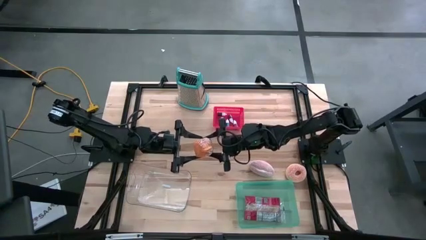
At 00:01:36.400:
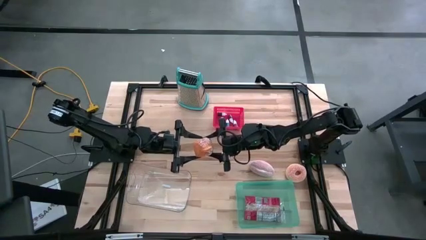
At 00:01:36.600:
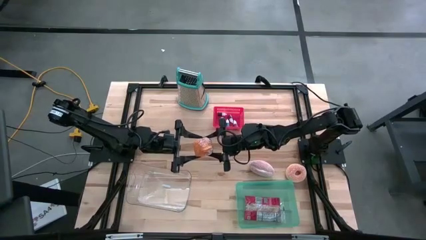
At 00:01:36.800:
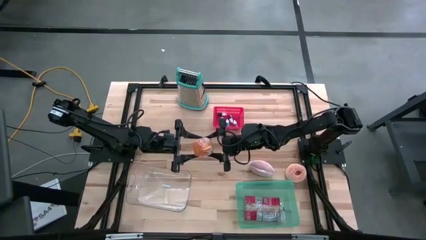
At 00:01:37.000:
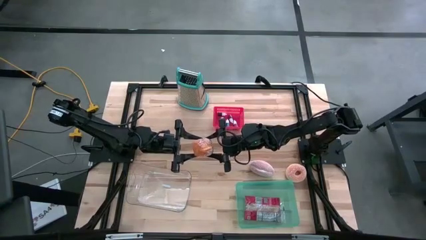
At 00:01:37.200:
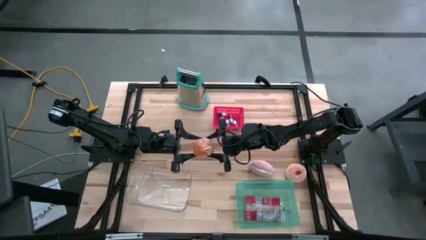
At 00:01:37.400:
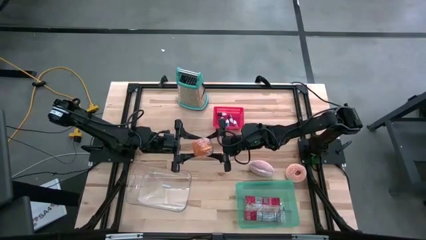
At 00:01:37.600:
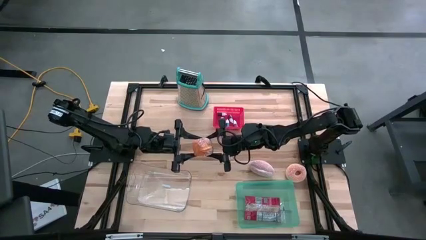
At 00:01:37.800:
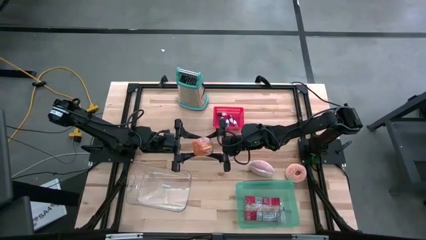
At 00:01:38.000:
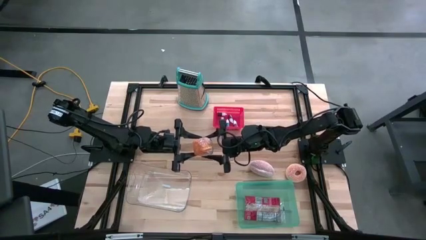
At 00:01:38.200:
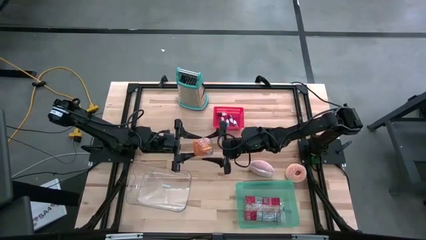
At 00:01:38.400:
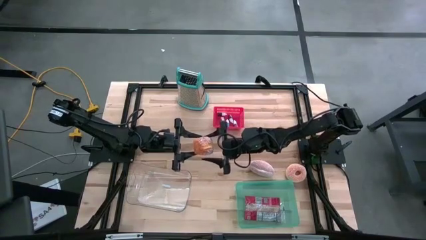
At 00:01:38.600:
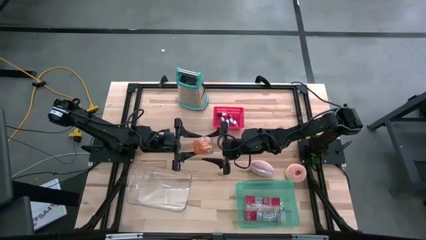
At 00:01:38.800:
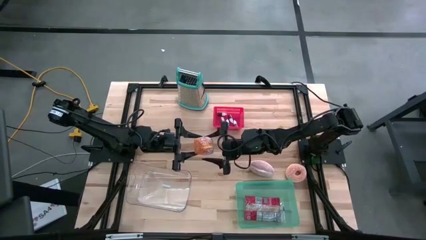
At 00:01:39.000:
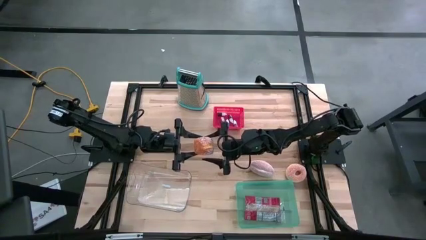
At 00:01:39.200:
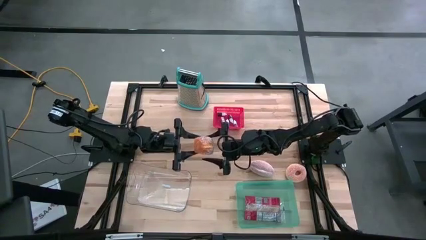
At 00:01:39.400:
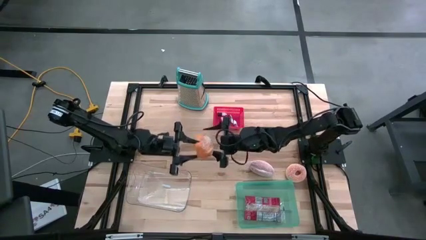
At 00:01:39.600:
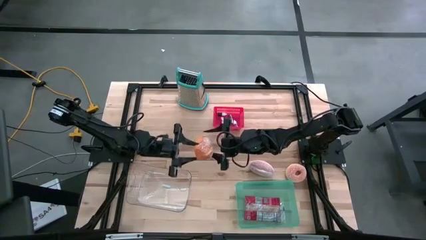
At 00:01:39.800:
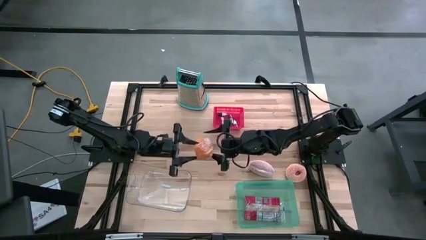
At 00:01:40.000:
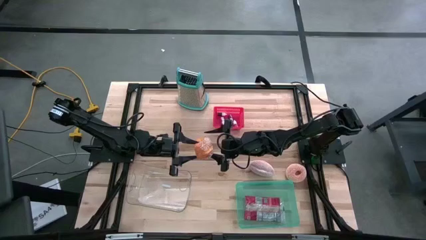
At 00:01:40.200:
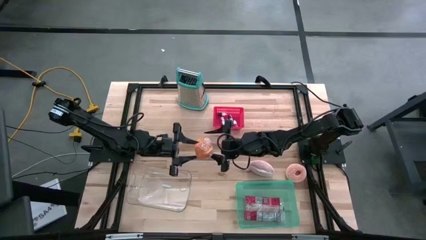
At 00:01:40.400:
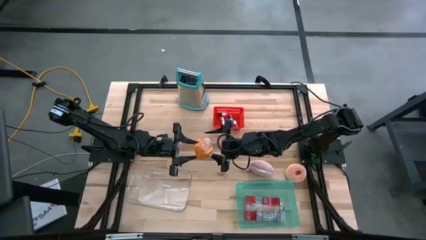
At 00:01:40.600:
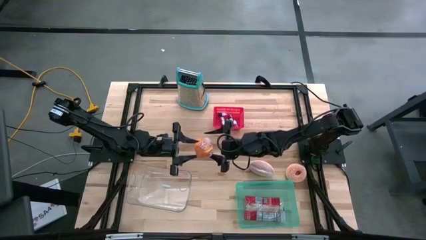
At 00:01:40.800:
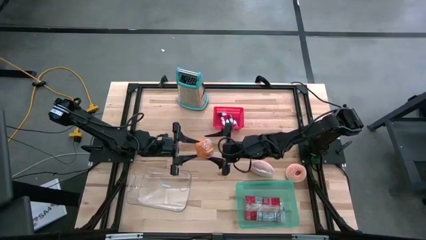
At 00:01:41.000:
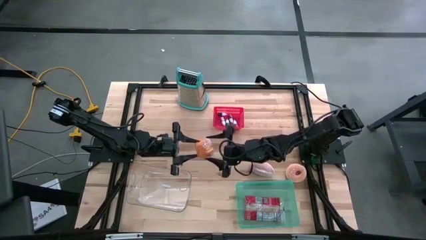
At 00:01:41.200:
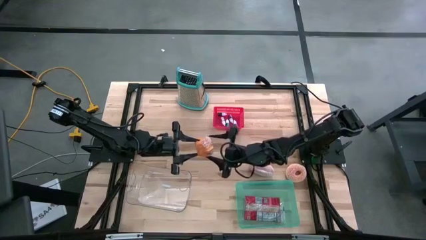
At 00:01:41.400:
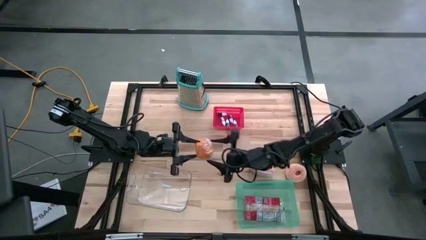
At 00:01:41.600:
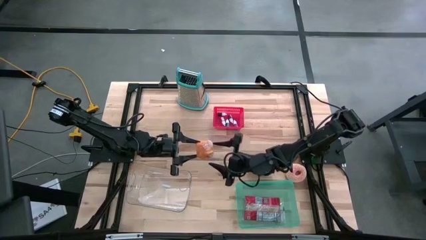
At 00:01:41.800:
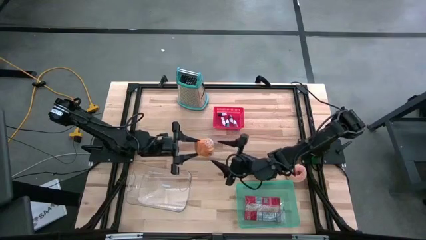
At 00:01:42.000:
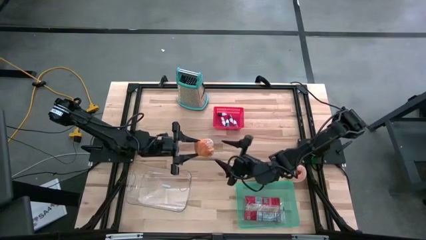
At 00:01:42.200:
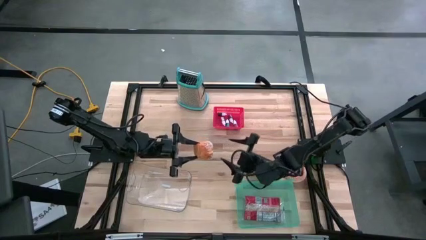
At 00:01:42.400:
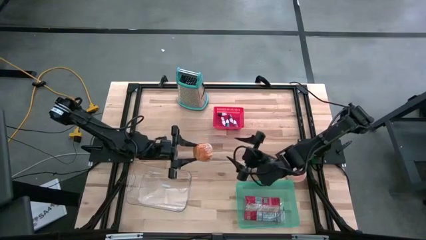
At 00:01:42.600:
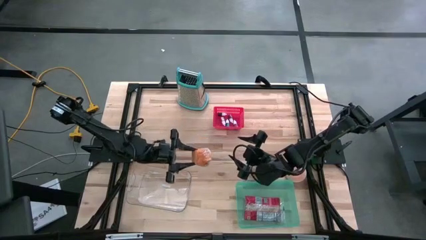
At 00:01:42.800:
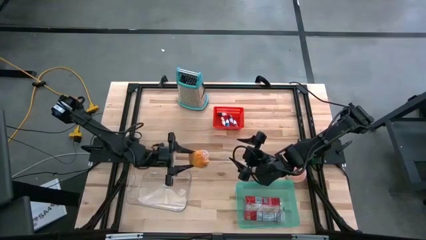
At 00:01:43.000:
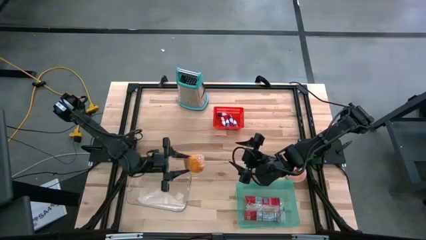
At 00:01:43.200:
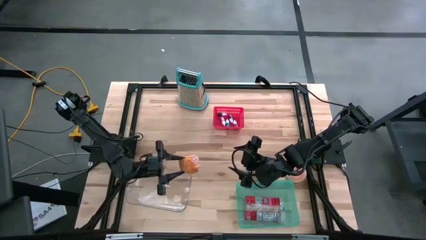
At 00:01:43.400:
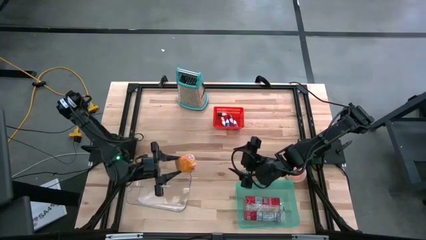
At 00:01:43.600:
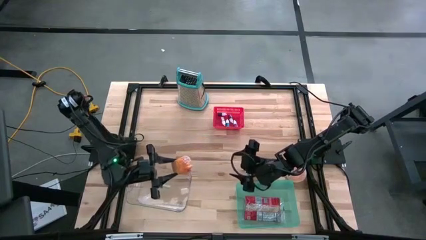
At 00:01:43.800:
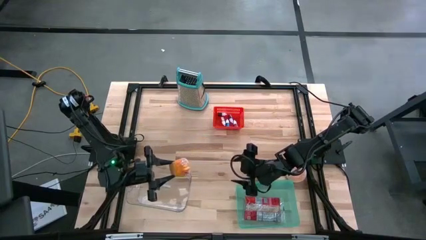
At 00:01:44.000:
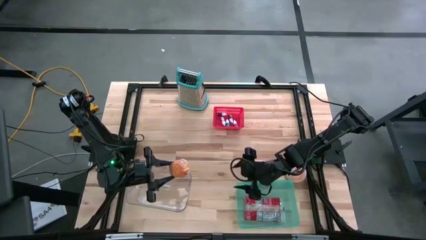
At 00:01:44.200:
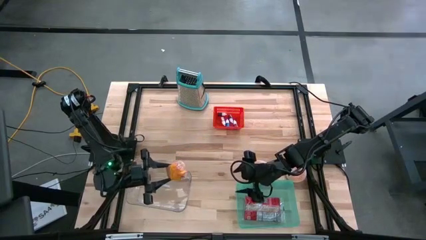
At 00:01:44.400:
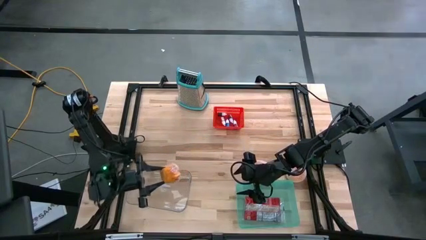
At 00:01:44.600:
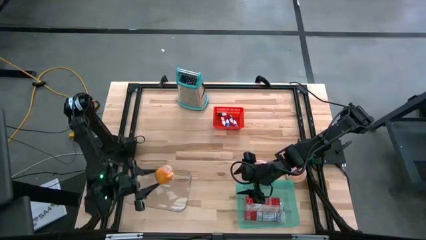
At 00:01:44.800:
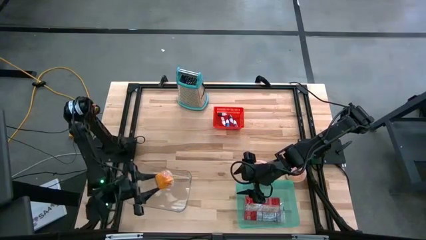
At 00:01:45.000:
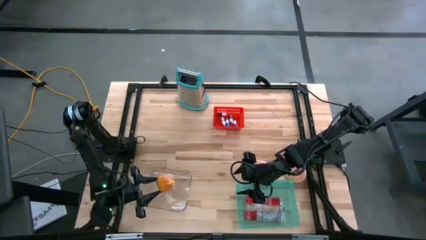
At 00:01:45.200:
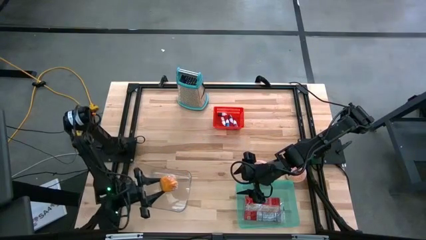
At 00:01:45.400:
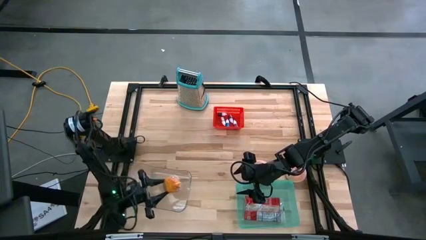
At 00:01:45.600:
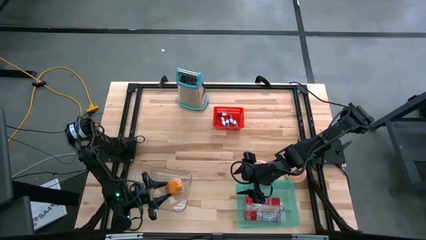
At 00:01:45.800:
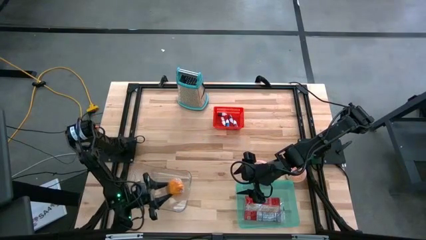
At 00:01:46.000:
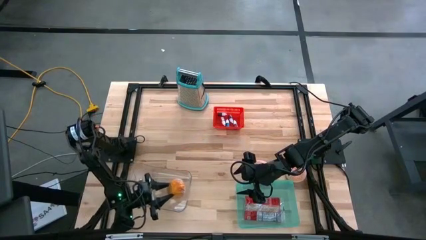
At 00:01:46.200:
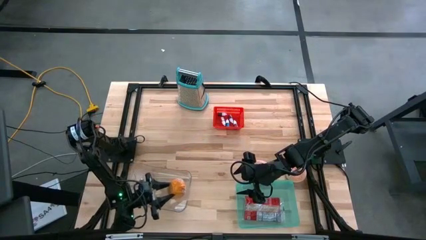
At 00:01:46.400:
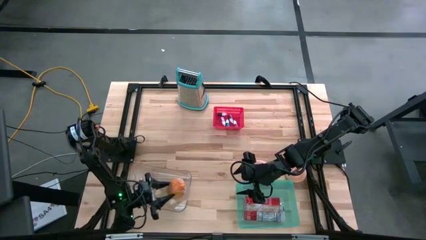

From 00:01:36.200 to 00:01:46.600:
Put the bread into the transparent bin
